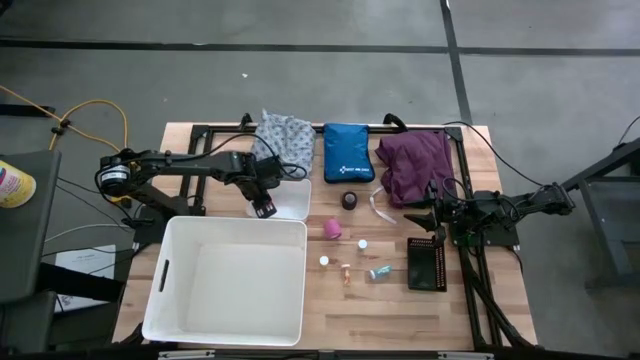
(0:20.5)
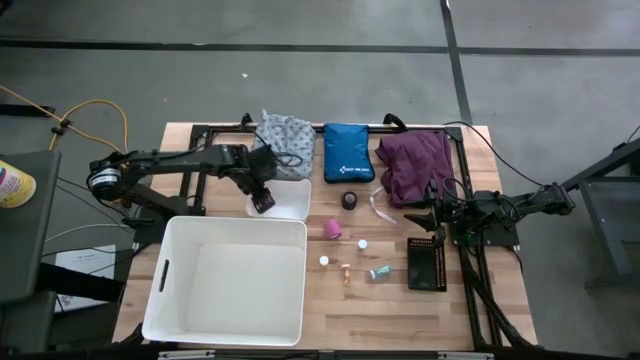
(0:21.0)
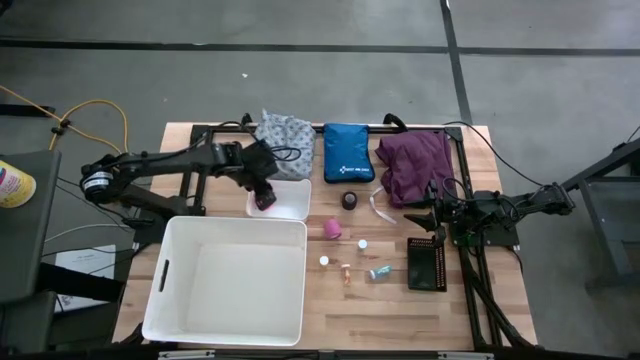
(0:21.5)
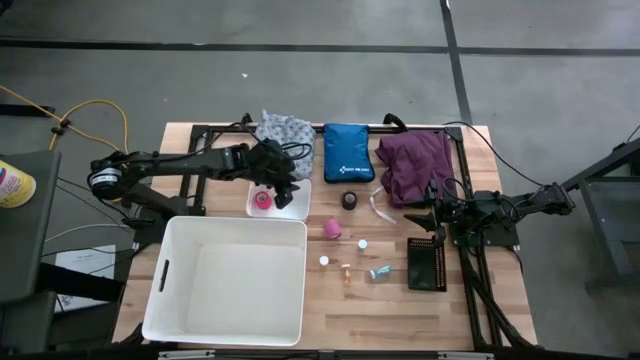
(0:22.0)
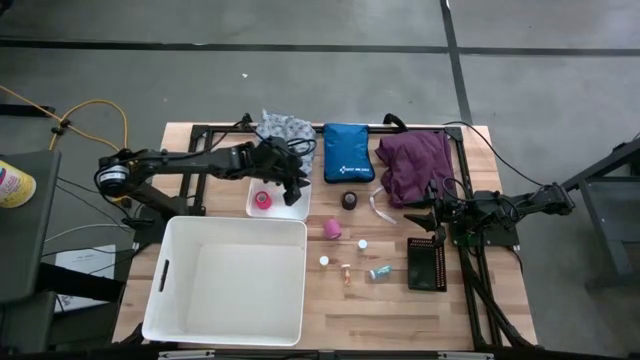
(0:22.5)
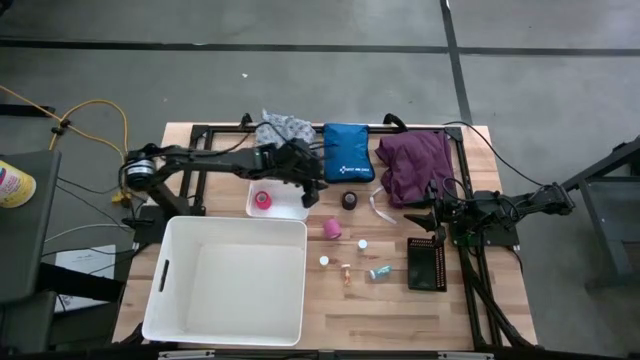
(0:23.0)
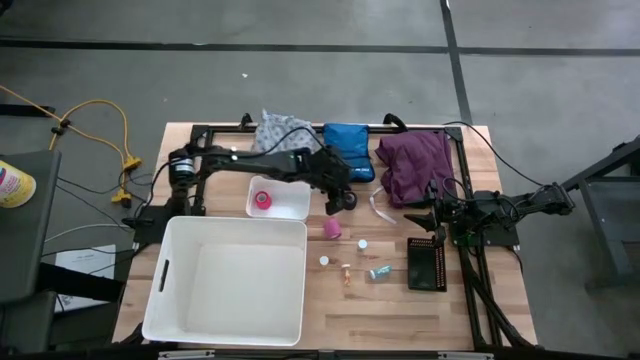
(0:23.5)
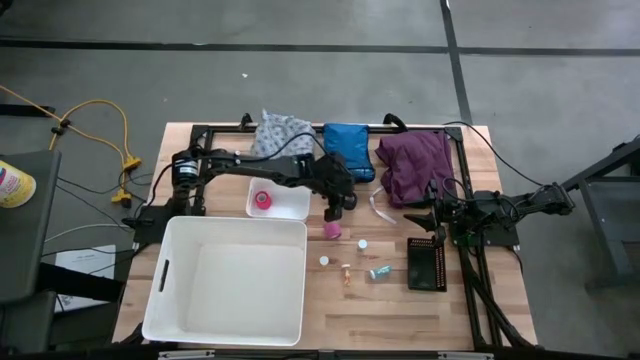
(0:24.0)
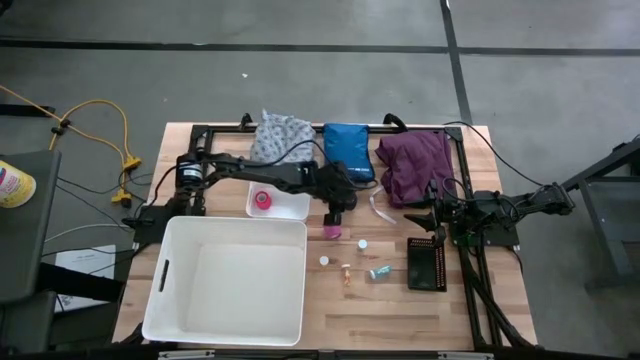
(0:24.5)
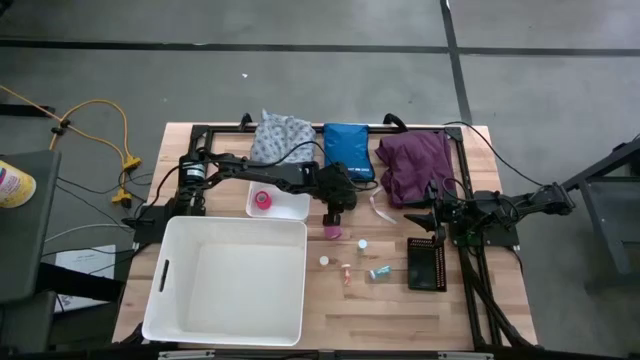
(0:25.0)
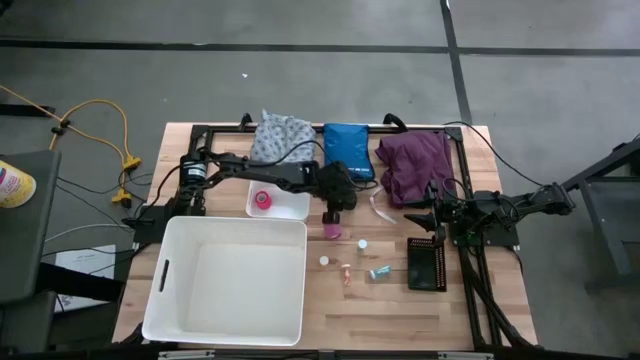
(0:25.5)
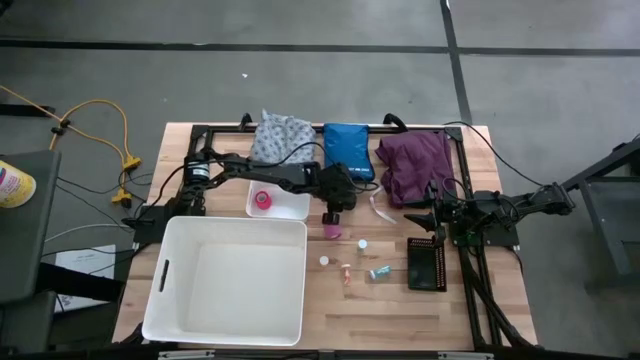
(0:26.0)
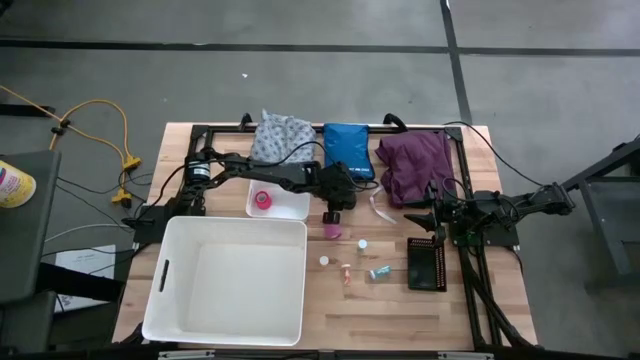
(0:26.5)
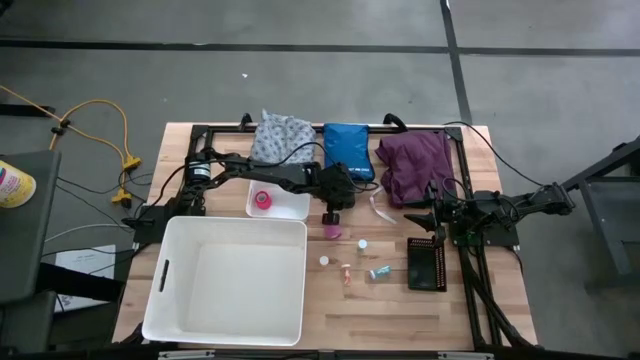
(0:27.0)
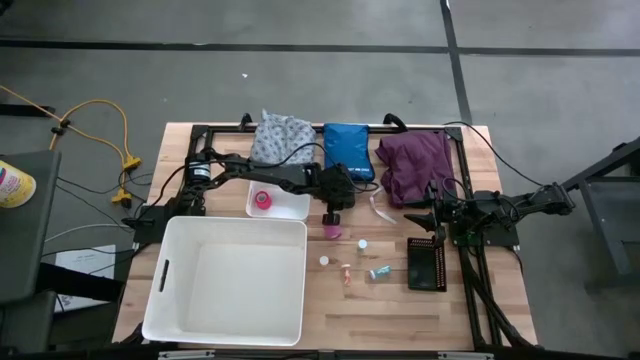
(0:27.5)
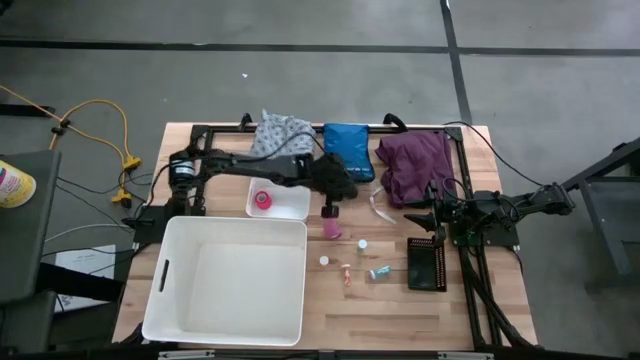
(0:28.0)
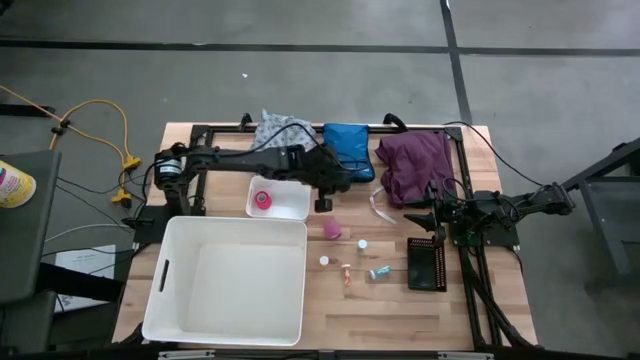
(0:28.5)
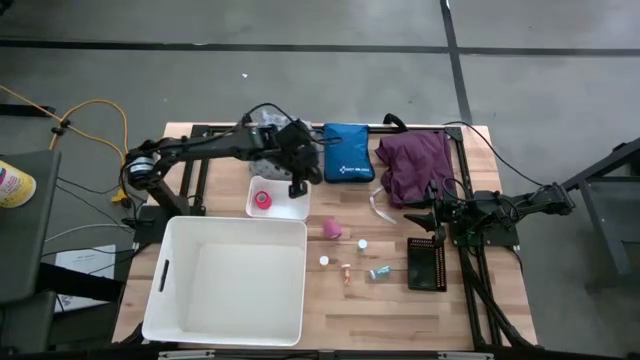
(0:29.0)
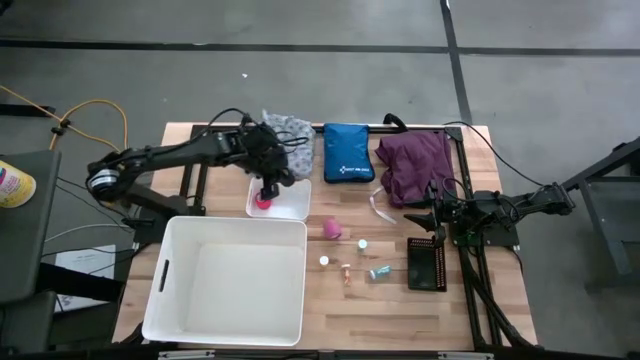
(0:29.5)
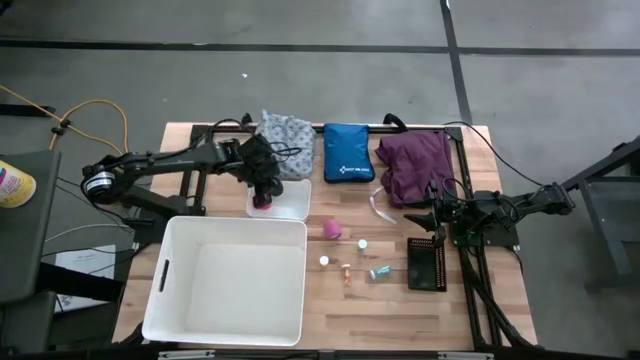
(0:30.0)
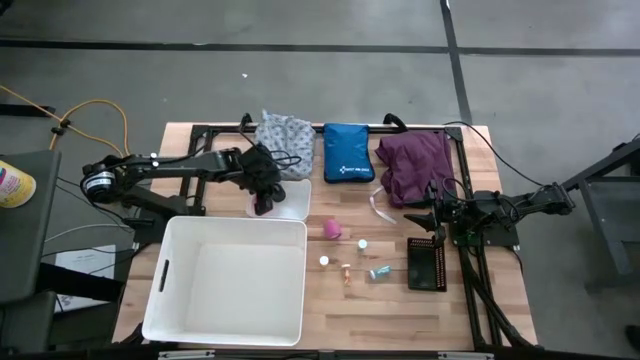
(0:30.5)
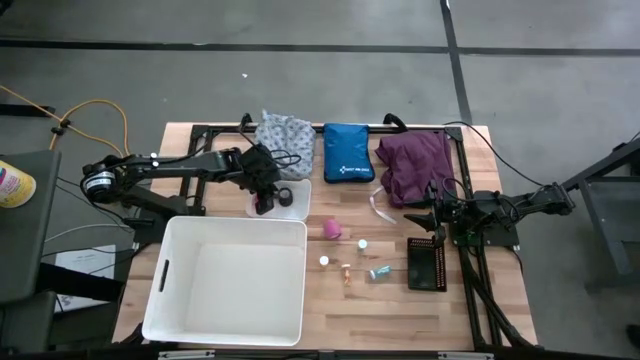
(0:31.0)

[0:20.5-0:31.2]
Task: Pick & place medical supplies in basket/bin
Put the black bandage into the white bin

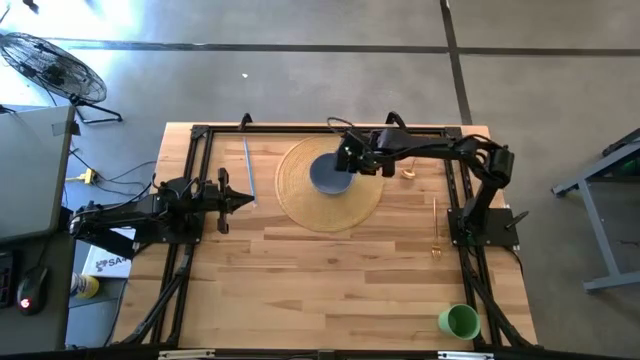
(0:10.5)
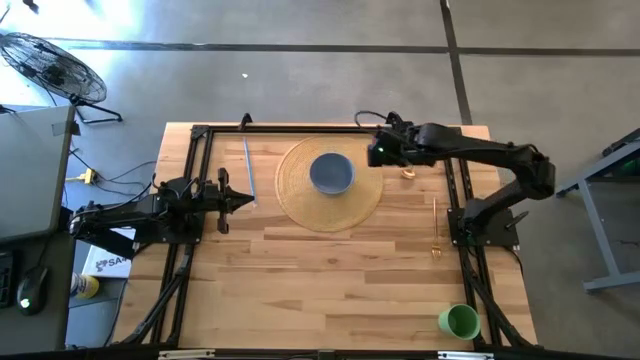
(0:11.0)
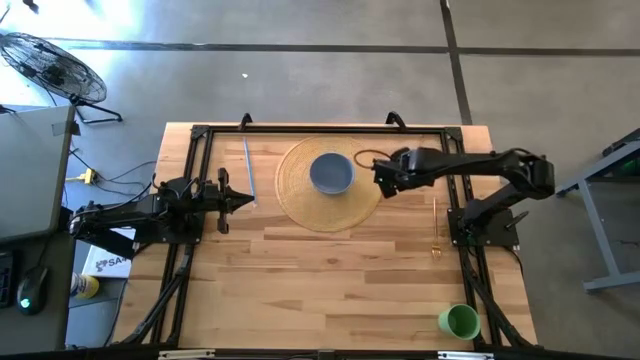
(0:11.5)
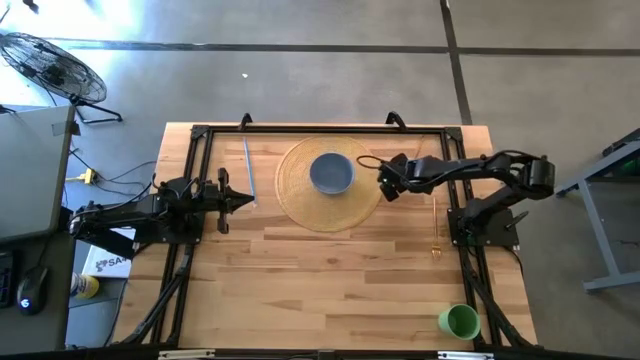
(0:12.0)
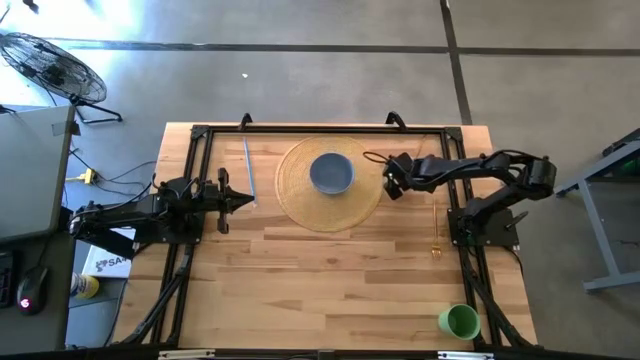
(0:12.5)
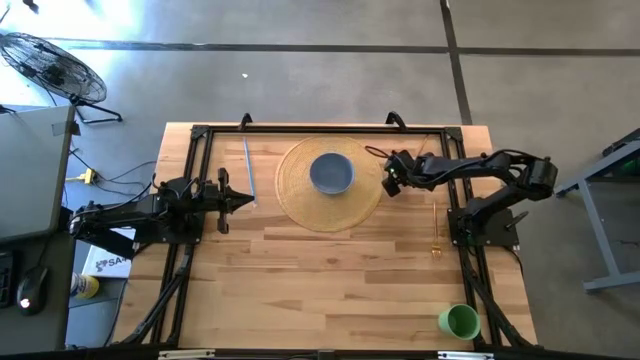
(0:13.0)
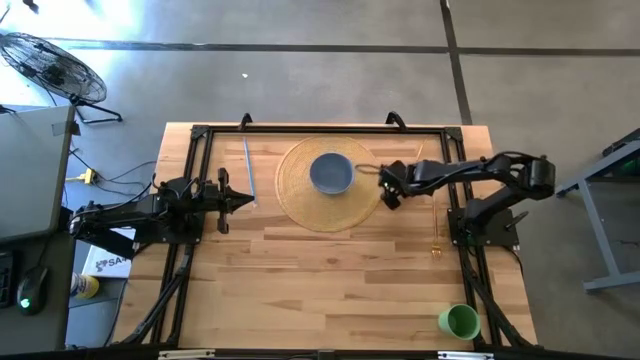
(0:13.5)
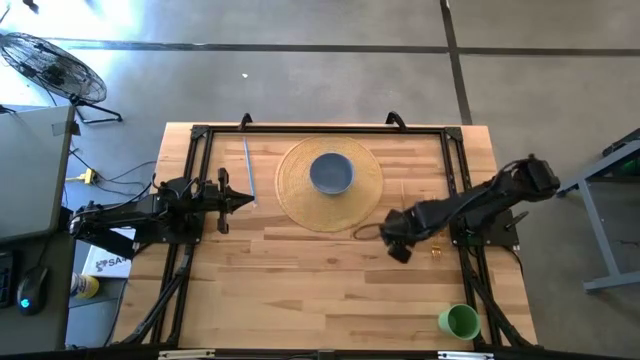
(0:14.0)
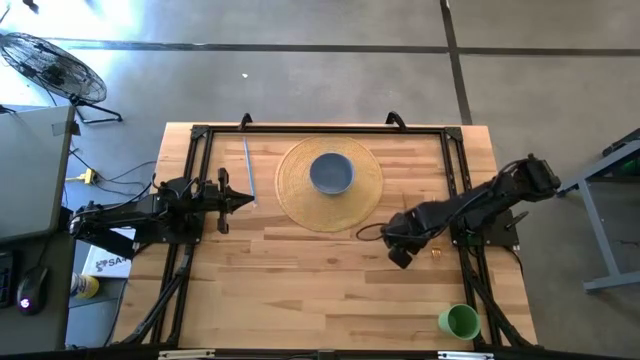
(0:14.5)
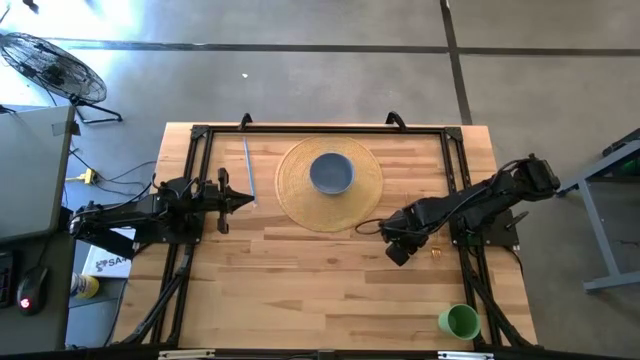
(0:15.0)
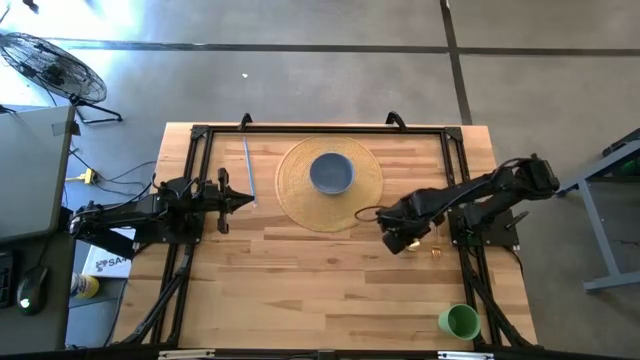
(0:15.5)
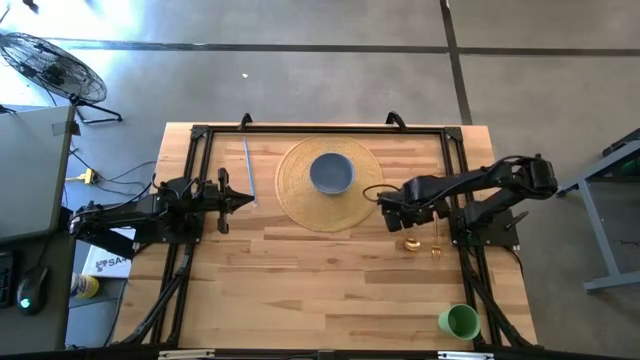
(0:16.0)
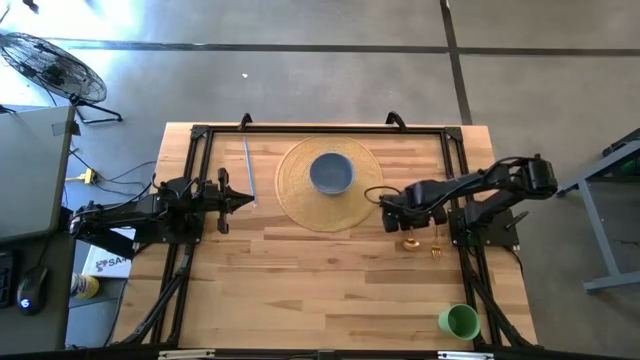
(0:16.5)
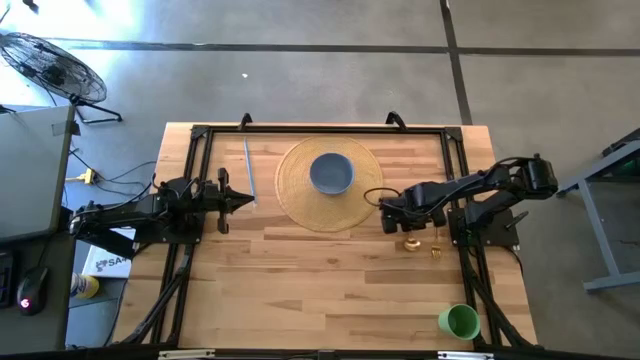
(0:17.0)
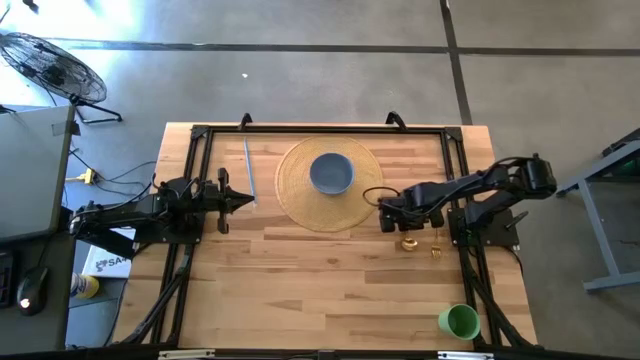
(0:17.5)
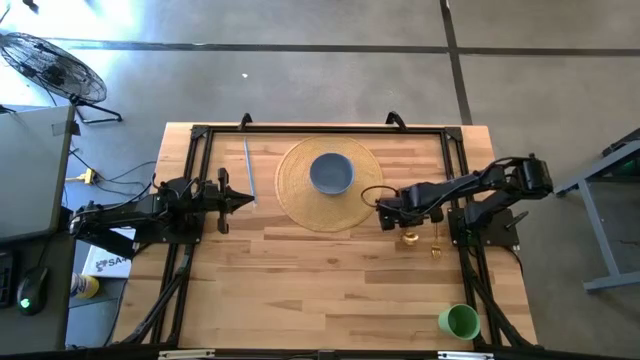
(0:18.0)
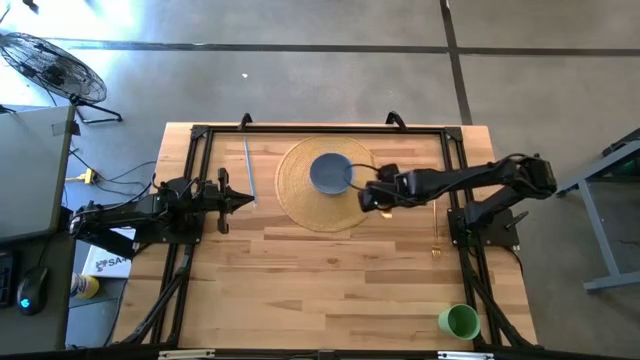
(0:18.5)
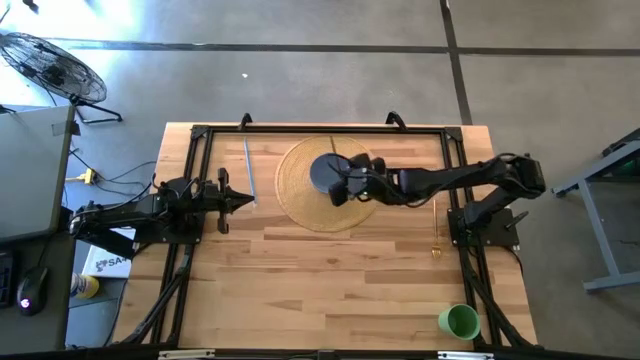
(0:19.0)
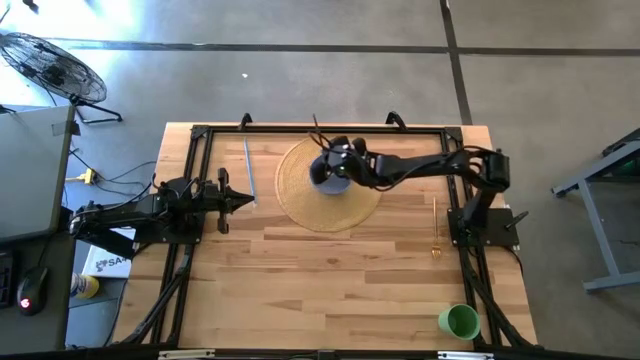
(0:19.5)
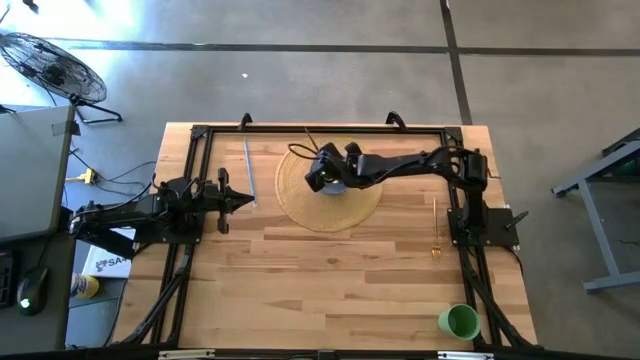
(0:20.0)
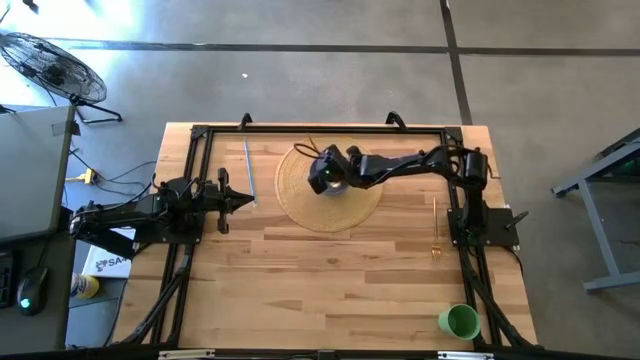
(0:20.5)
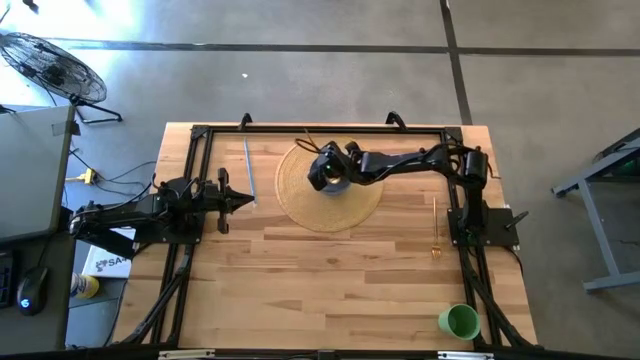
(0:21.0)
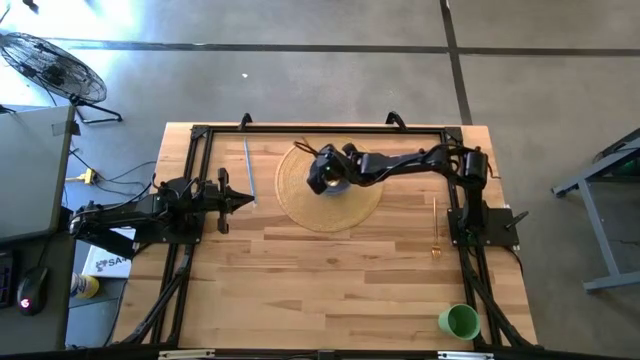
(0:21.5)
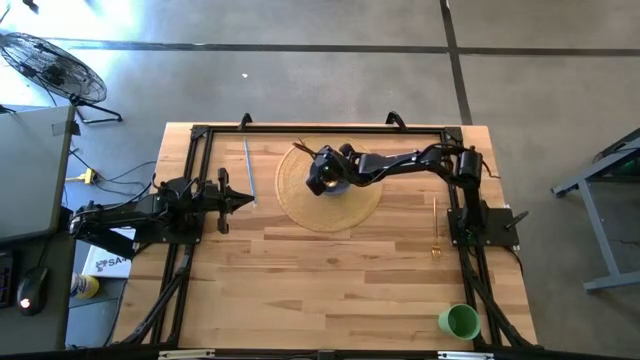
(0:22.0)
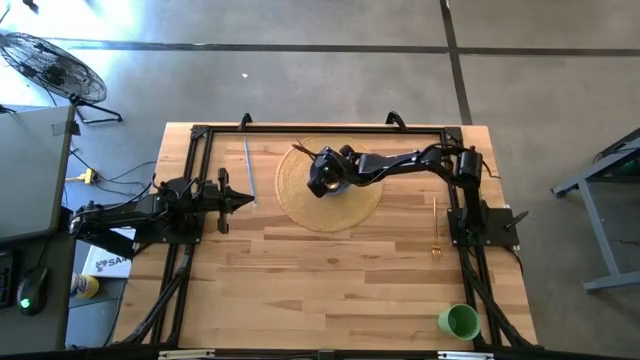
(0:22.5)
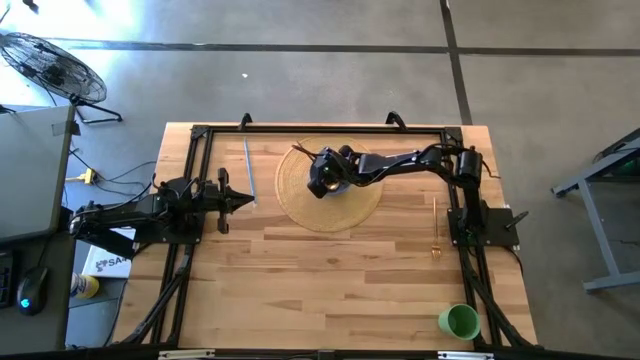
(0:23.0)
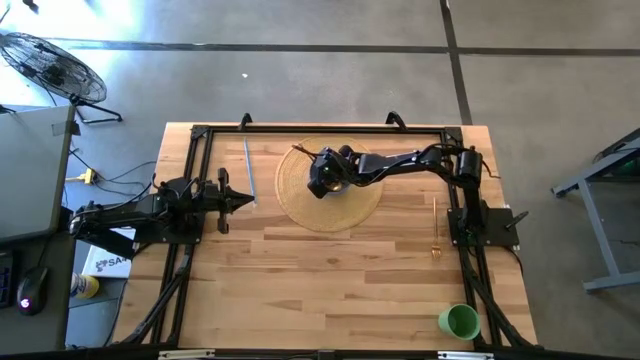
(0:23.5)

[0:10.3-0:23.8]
Task: Pick & Place Utensil
Put the gold spoon into the blue bowl on the brown mat
